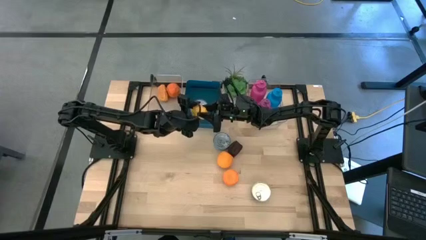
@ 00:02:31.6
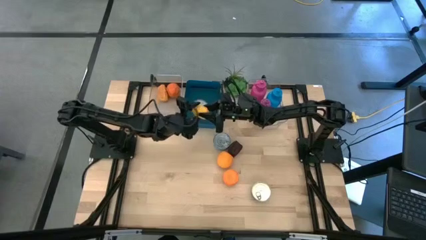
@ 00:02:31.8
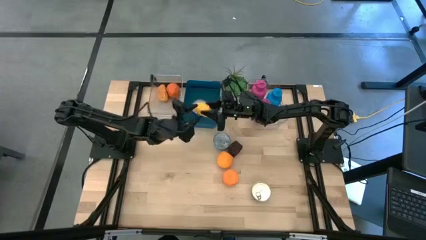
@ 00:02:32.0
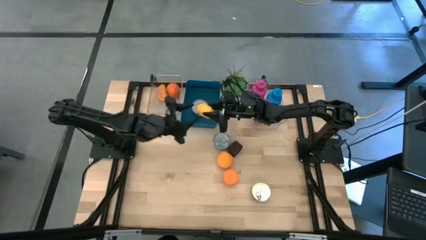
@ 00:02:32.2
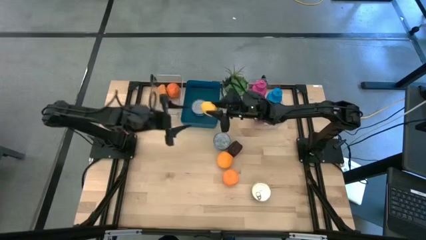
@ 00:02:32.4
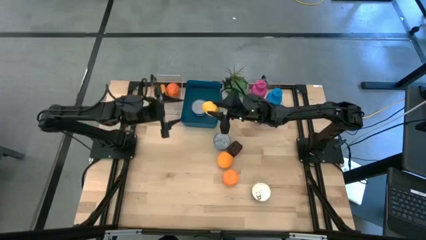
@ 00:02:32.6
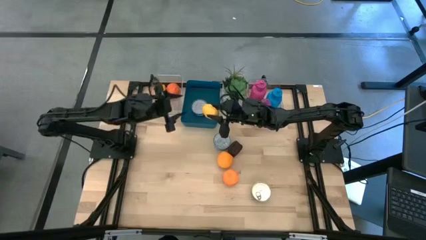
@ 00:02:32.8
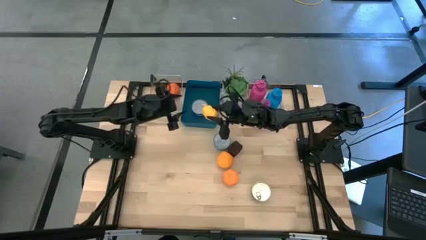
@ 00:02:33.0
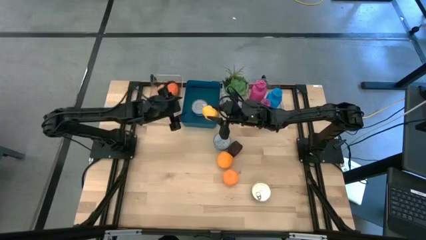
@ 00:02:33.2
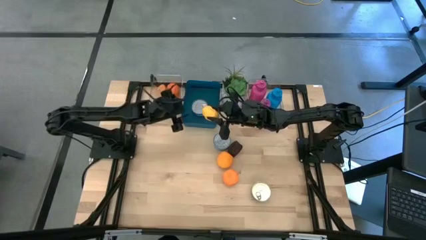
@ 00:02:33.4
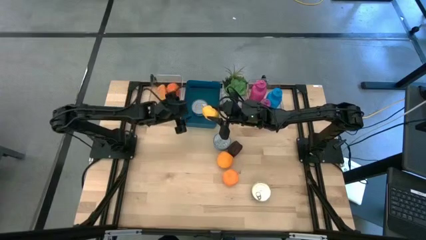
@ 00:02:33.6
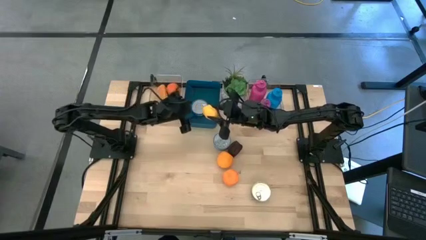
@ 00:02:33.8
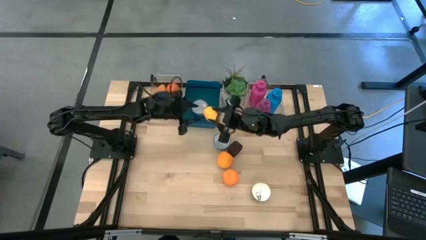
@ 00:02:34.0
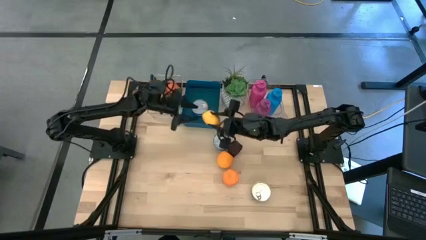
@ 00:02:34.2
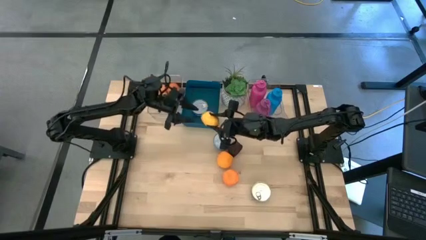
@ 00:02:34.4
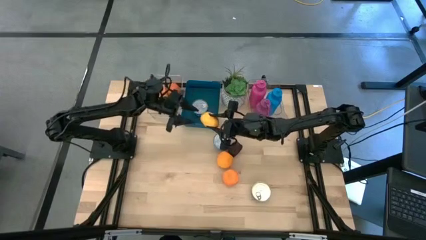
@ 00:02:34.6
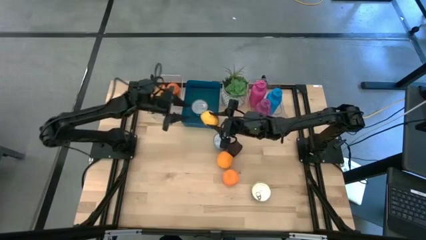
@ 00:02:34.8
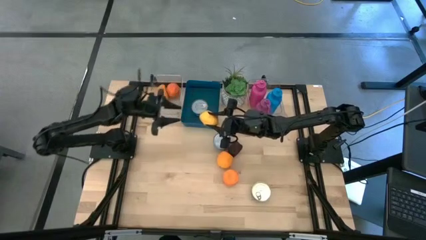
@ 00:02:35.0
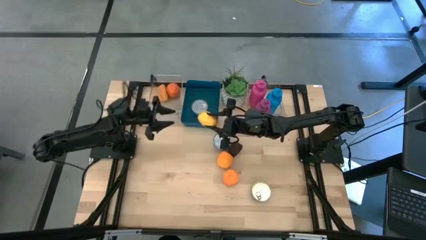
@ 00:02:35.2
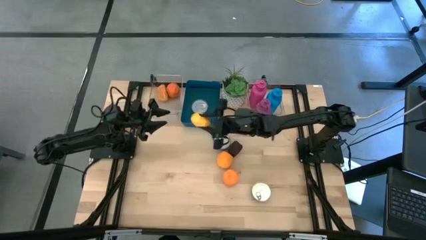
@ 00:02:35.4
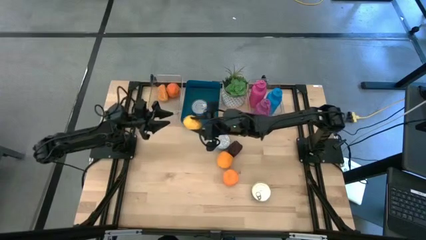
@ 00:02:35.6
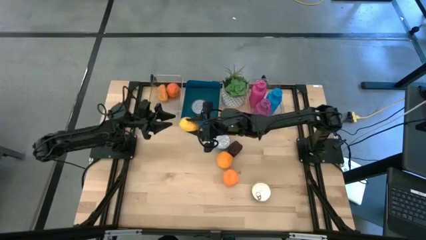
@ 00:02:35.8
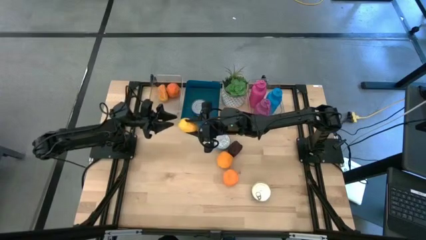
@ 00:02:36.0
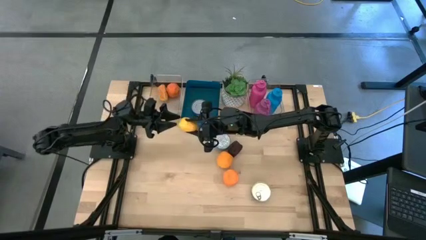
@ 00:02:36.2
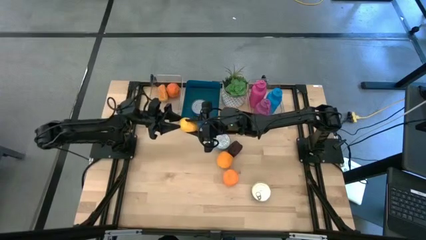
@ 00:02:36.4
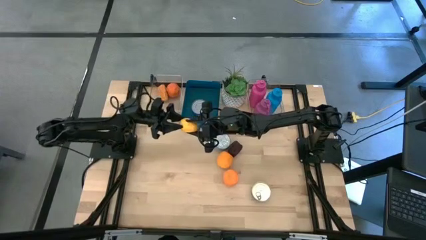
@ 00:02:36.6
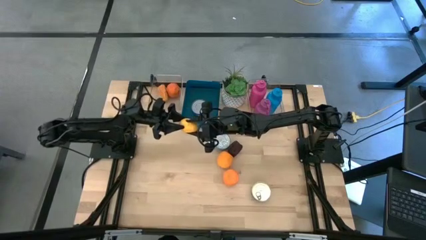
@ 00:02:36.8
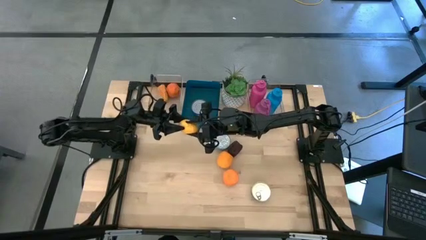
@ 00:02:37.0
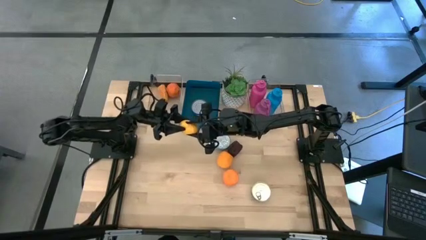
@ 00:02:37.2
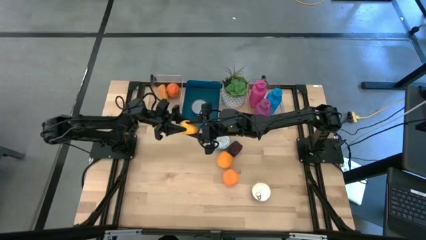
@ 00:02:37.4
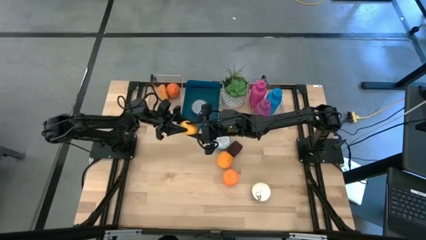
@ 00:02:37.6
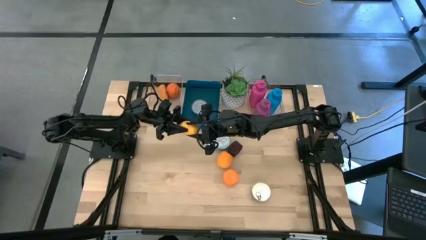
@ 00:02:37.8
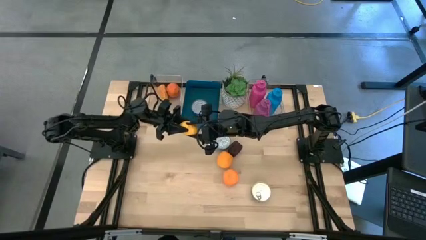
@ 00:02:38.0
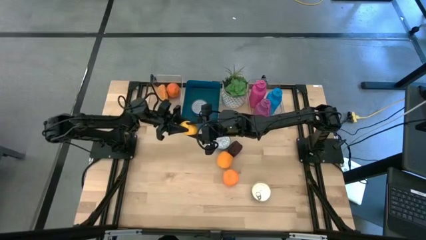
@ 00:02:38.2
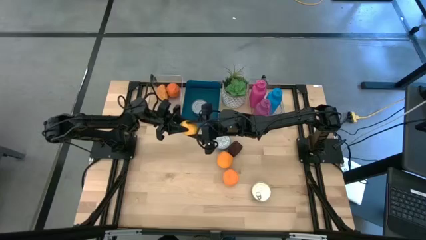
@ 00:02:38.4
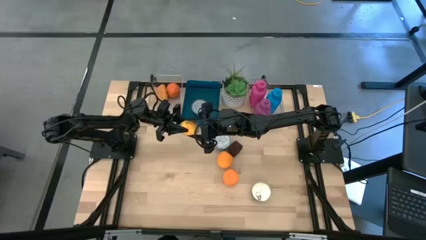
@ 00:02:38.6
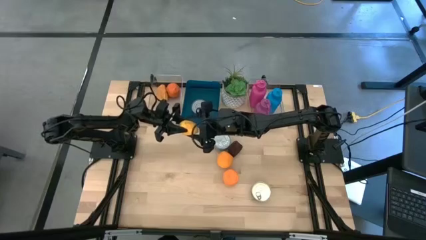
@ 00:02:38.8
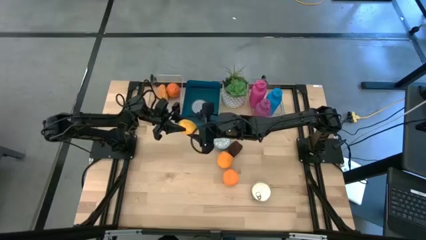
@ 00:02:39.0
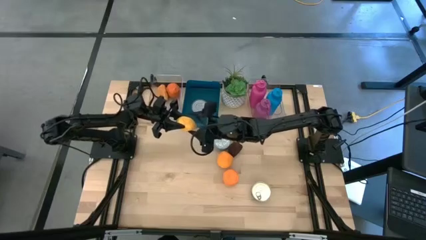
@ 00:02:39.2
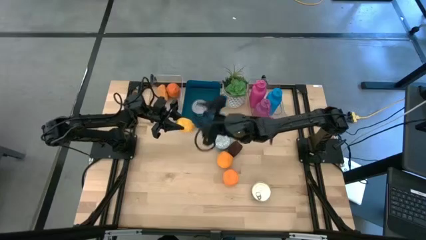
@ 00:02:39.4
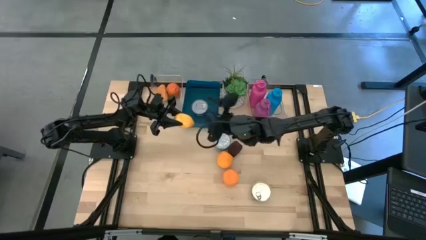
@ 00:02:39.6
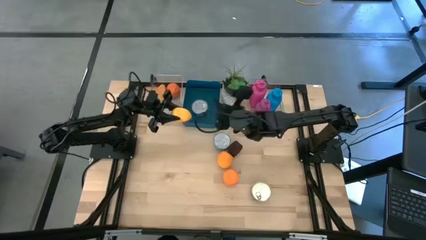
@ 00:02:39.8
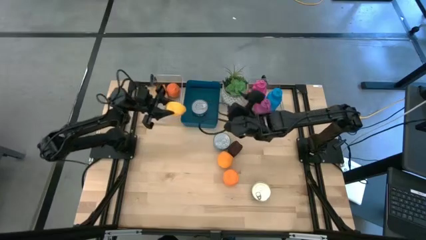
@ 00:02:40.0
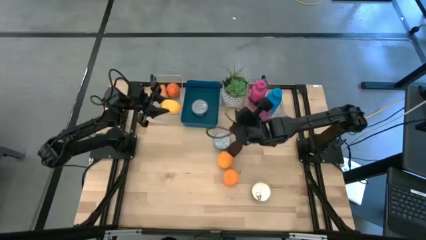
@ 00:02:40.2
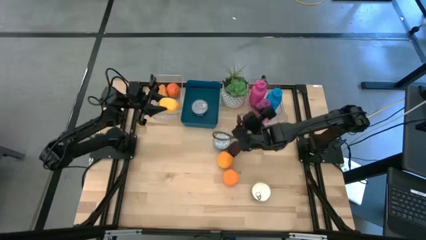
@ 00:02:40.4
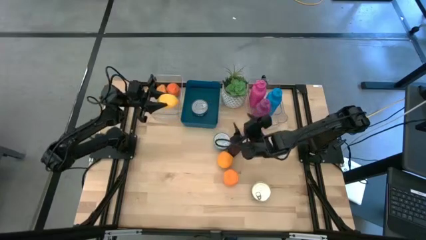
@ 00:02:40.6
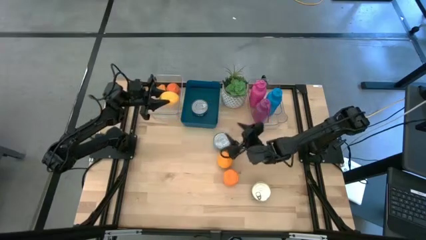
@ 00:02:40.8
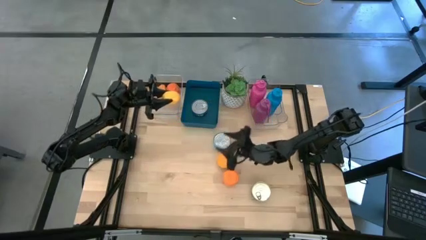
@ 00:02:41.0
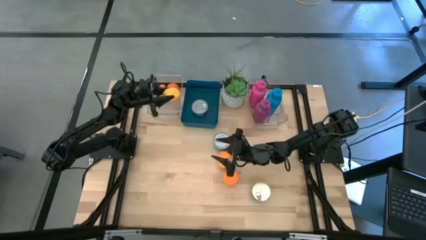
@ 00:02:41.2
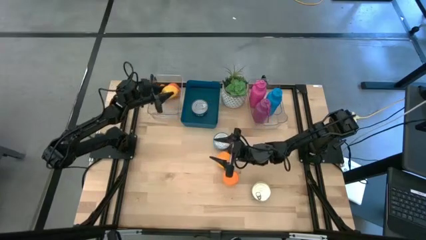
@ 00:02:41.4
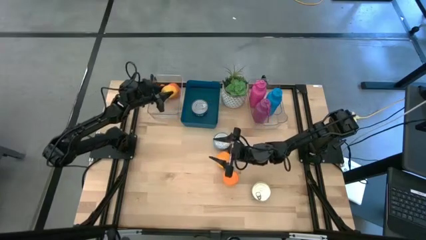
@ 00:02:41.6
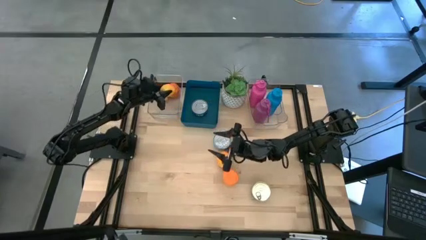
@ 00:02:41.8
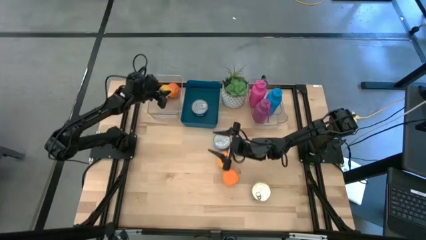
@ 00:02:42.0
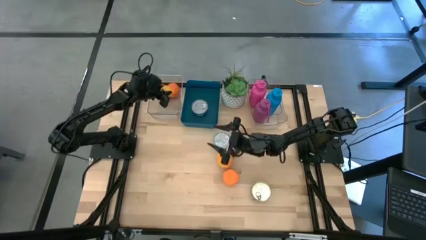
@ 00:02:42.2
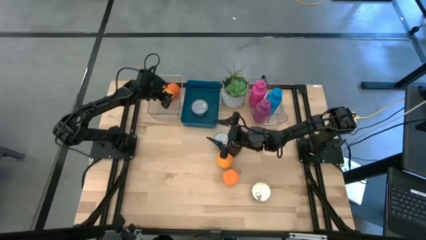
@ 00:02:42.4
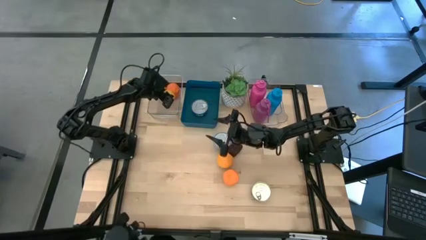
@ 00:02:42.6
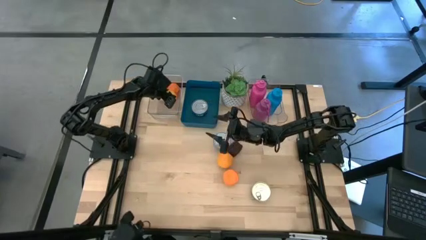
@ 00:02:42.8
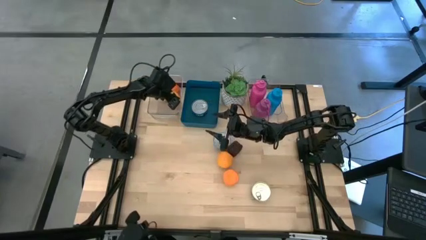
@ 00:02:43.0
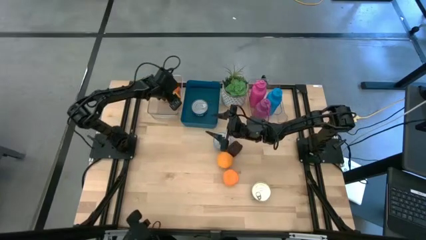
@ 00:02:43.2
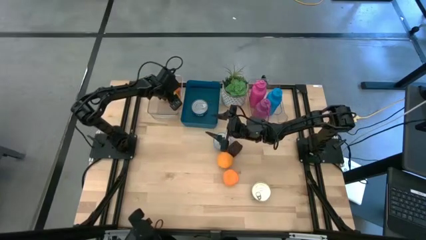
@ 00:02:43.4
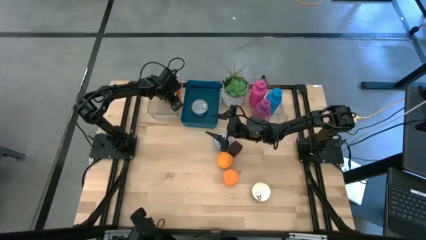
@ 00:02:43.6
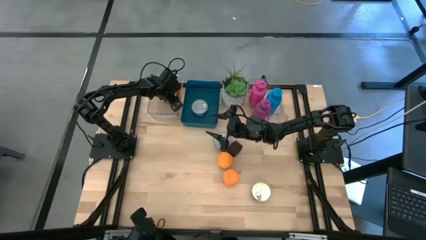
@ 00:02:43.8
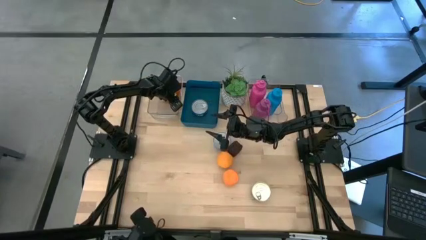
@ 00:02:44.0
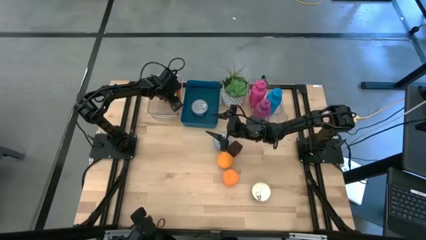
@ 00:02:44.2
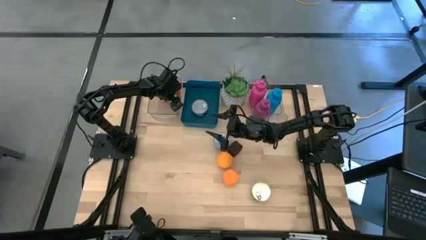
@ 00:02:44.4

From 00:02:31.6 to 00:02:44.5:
Task: Pick & Place Food Item
Put the lemon into the left transparent bin

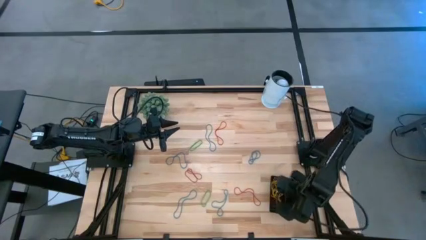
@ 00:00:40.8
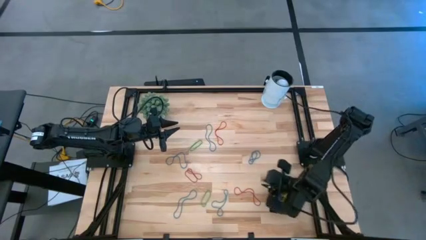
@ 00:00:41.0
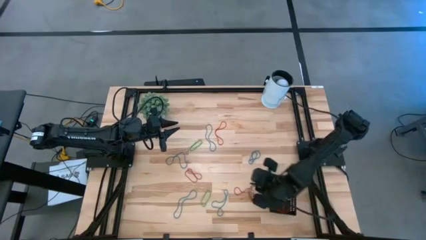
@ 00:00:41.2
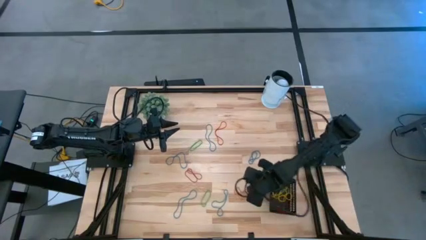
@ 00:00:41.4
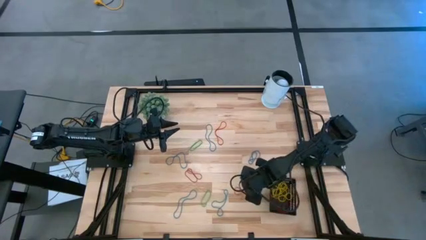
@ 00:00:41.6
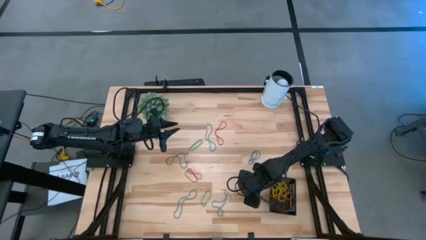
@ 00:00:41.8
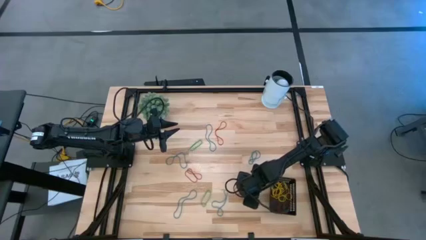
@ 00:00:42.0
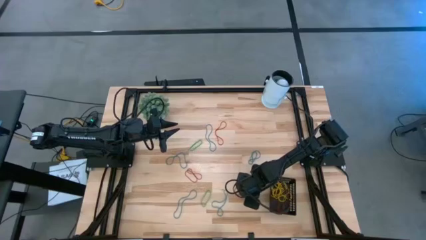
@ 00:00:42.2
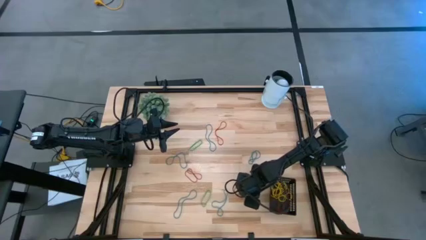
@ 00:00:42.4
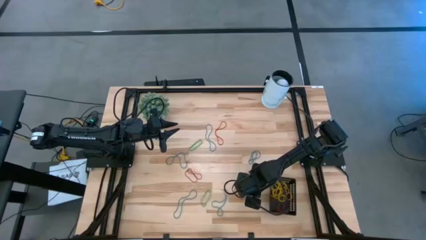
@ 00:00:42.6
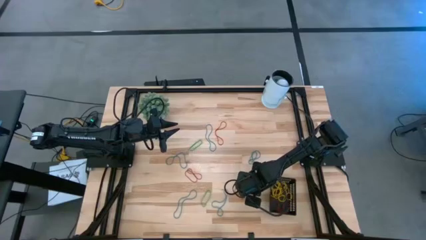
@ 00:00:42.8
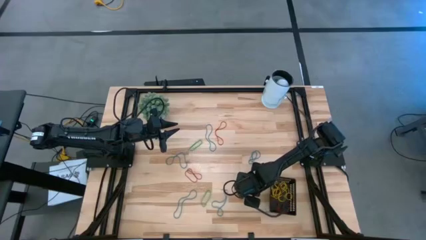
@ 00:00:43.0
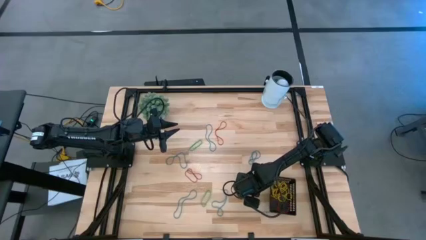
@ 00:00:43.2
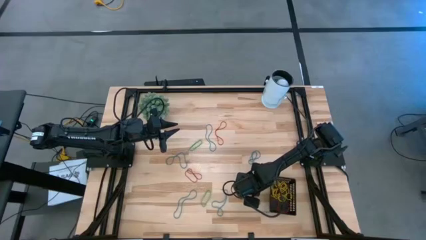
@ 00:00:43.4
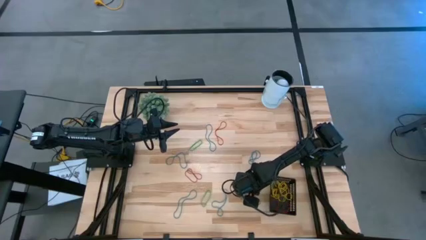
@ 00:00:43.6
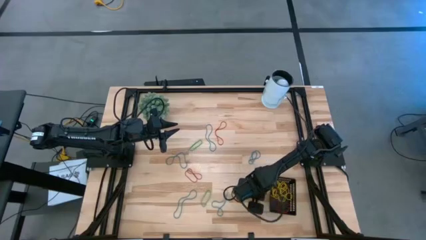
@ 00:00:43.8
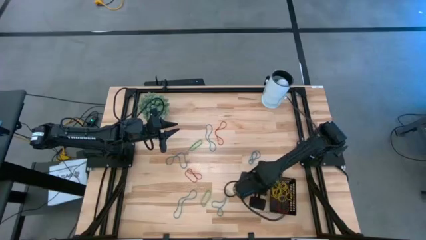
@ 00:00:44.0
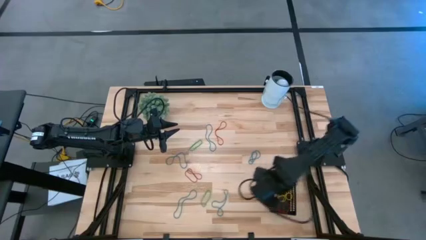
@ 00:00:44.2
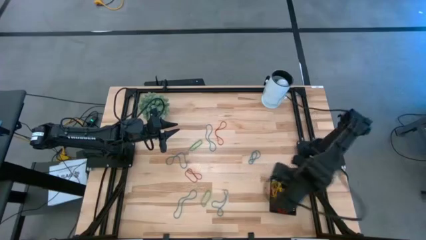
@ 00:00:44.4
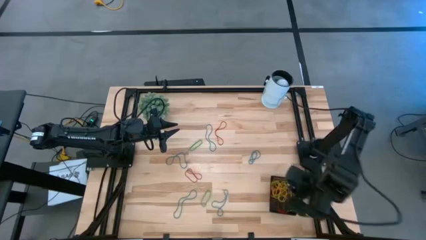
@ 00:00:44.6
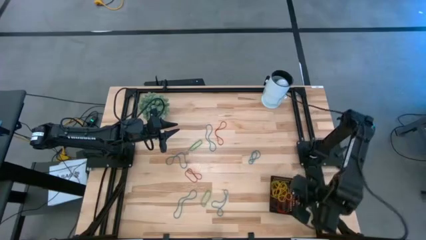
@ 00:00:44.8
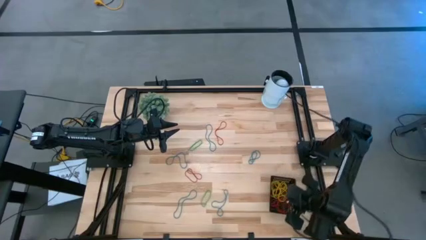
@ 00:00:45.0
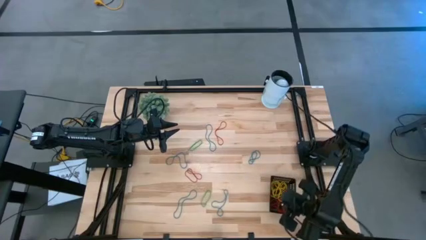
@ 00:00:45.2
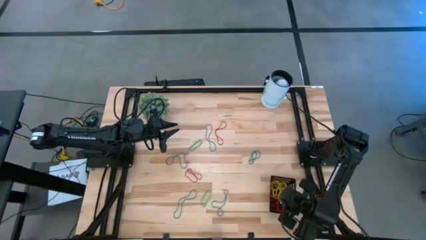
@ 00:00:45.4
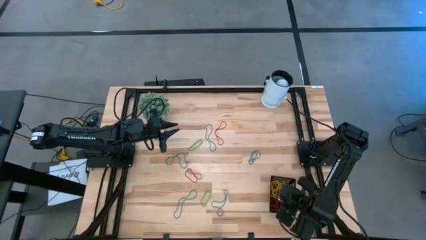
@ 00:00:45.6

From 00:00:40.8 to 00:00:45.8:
Task: Pick and place items into bin
Put the bottom right red rubberband into the black basket
